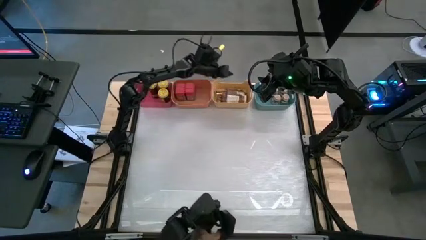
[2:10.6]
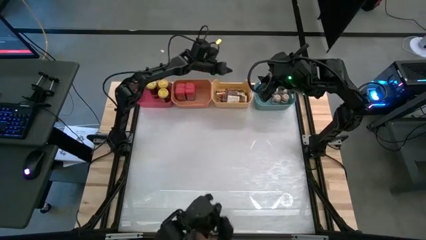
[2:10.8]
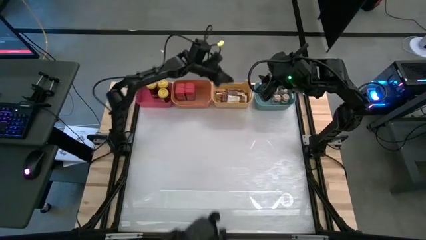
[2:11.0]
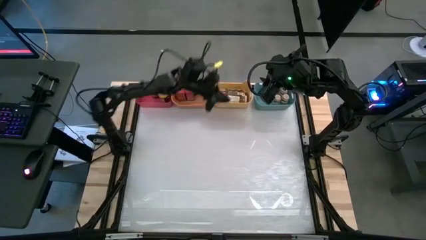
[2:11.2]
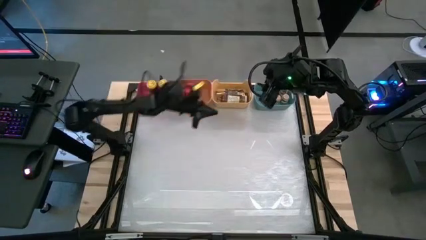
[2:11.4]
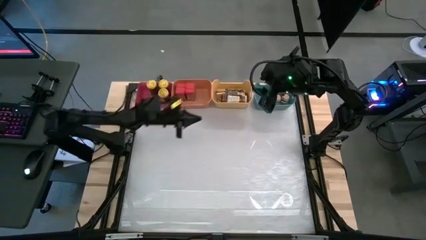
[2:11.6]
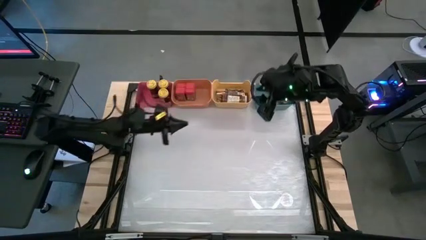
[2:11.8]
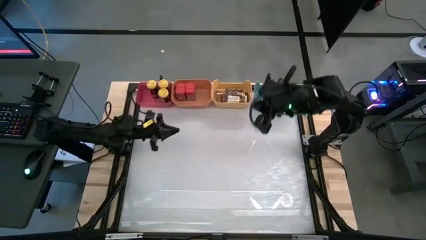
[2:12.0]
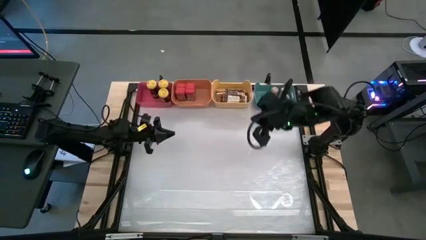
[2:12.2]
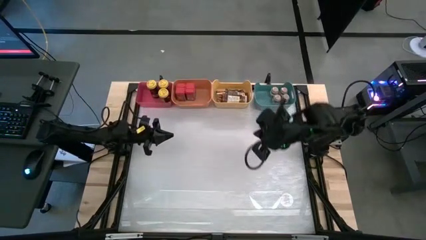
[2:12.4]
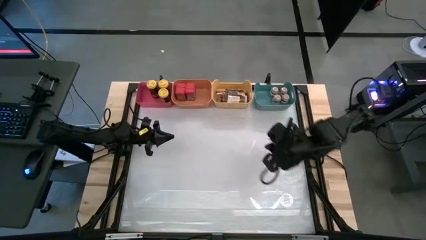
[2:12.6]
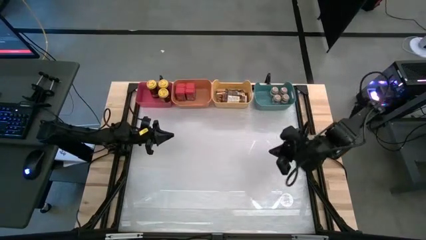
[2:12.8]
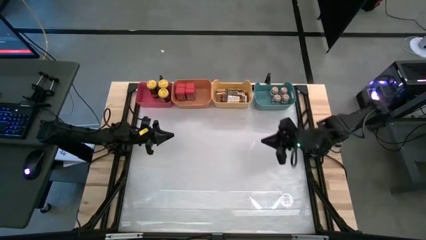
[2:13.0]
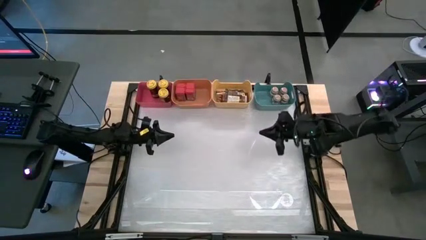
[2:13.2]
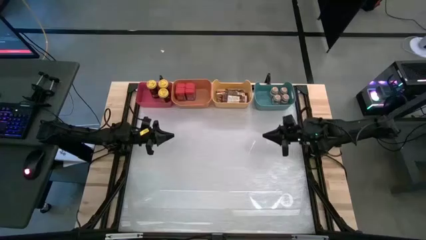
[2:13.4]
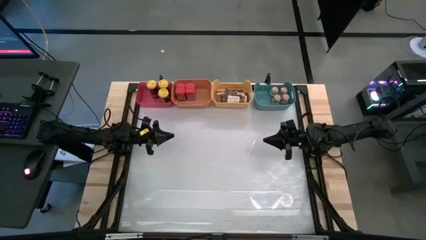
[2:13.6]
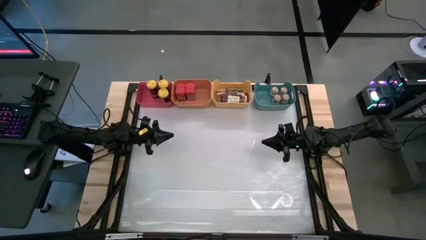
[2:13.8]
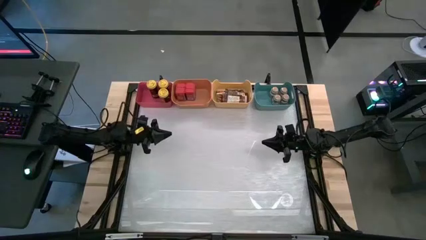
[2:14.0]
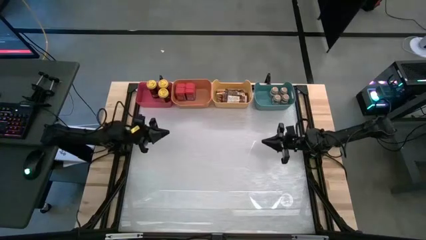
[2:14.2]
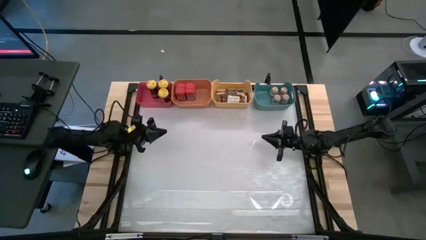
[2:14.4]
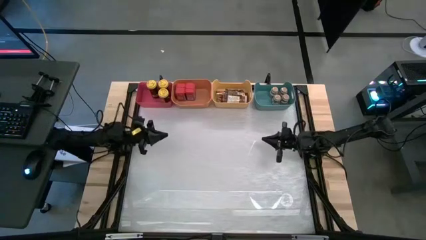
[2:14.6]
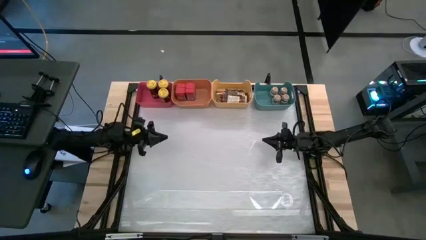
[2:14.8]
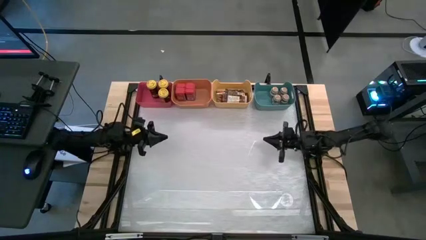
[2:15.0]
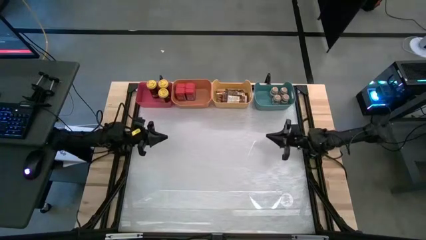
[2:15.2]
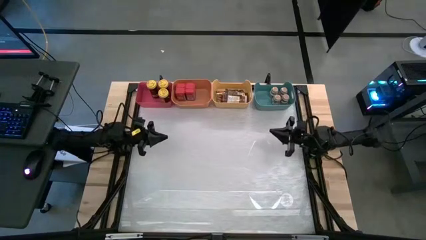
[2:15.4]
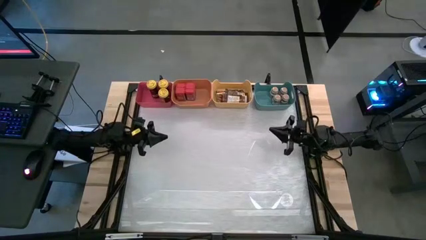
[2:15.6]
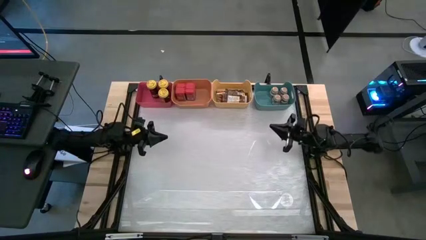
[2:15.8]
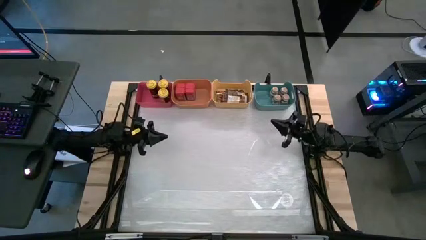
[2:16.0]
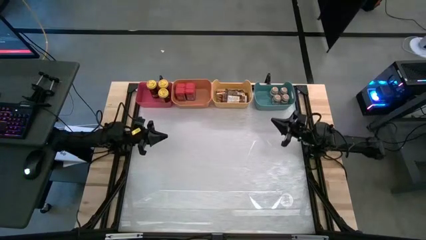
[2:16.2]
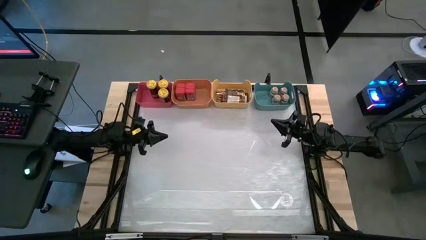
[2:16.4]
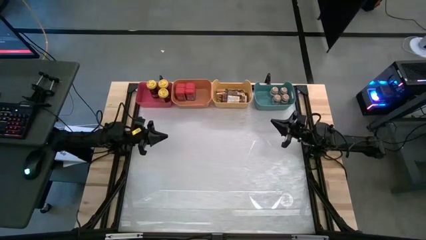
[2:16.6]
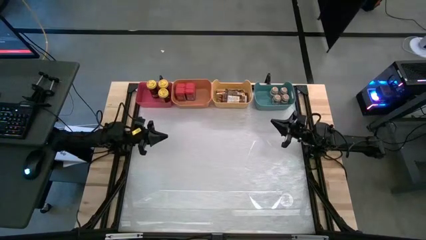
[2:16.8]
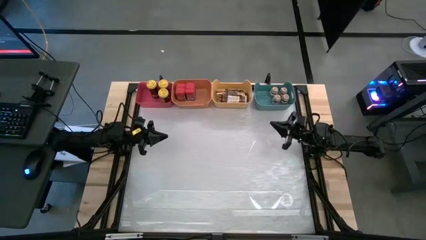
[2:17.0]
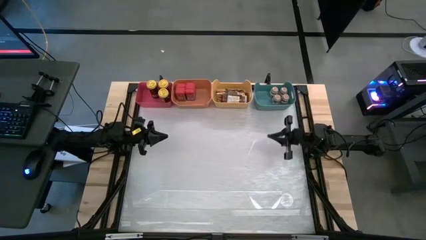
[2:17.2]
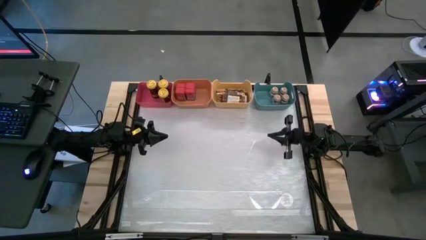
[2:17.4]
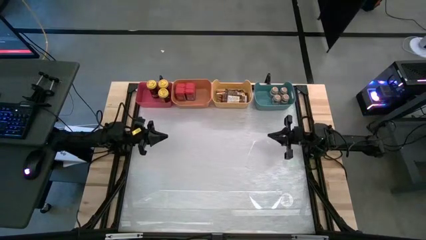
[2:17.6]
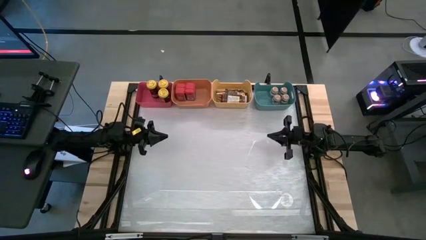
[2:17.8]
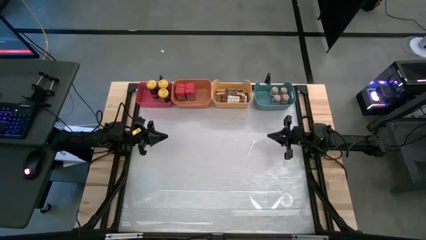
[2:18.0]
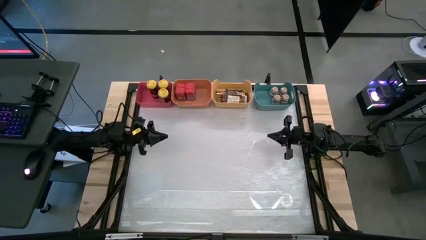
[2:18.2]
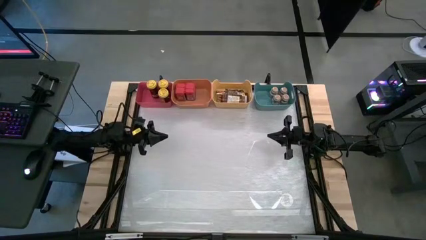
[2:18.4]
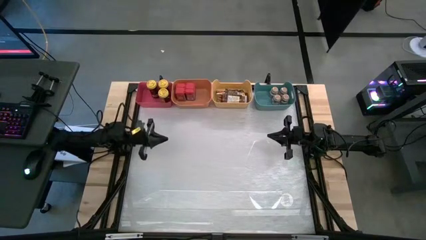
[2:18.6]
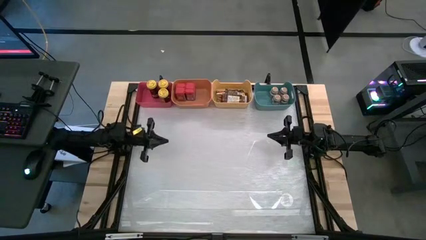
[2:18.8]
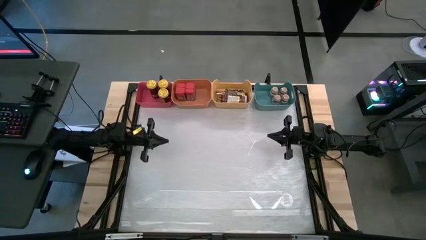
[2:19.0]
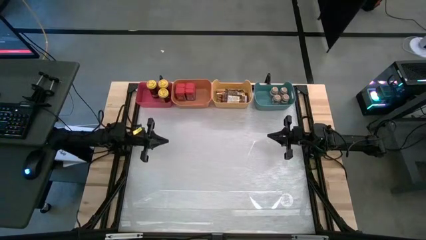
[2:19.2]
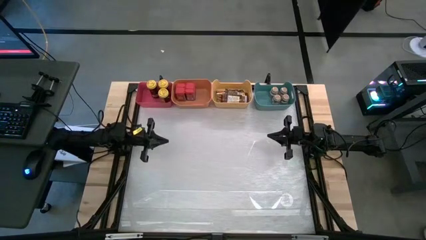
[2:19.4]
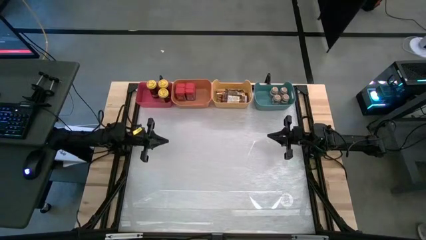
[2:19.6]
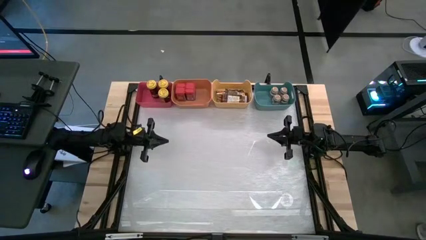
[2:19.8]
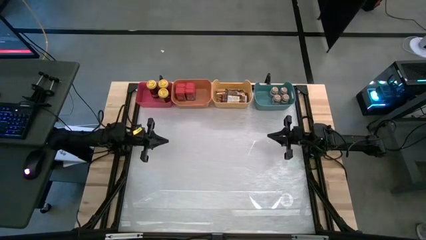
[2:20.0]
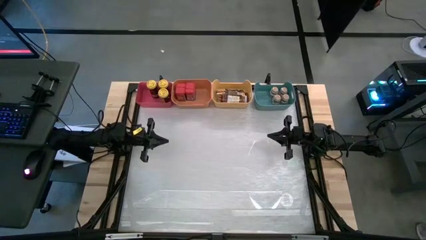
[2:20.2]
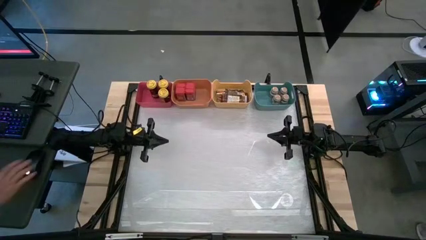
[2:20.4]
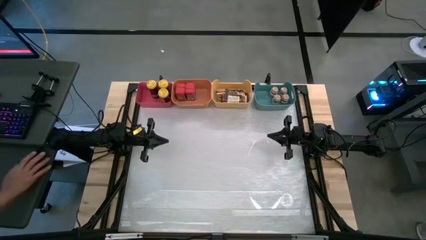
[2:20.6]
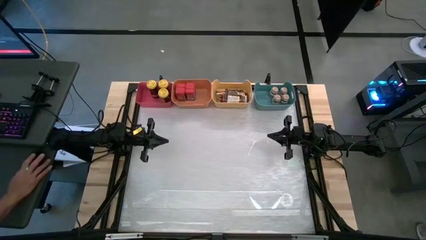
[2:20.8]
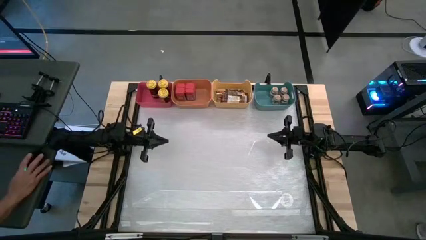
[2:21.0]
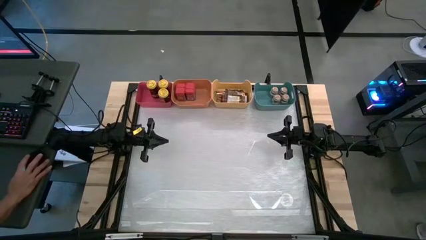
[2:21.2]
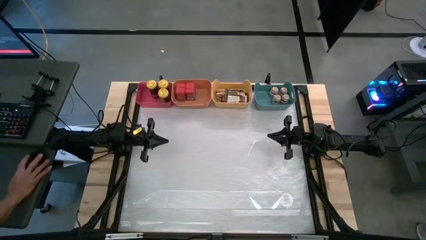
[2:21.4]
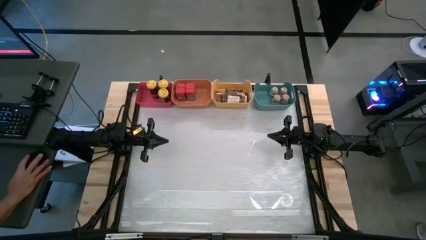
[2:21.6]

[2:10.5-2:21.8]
Task: Sort spices by type
Return to Home Position
